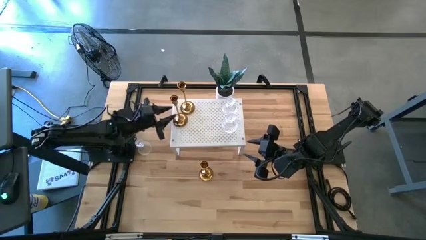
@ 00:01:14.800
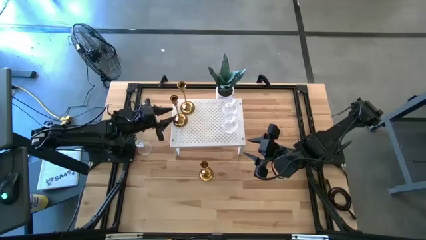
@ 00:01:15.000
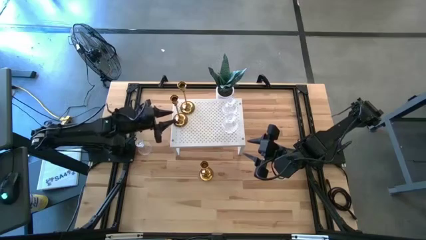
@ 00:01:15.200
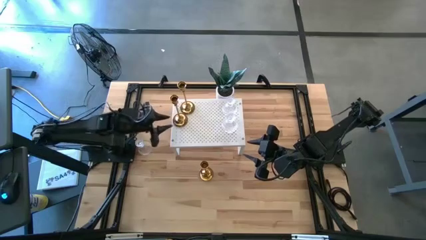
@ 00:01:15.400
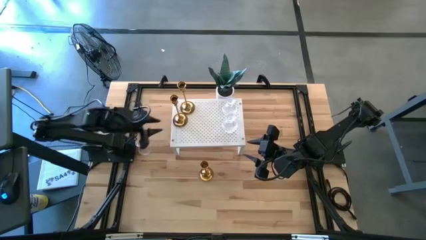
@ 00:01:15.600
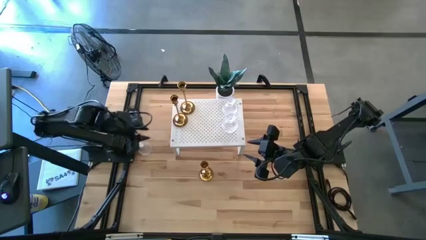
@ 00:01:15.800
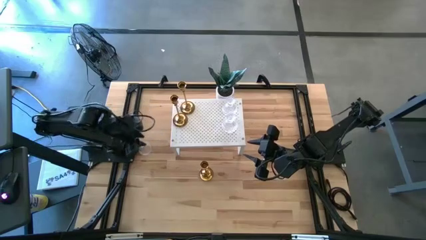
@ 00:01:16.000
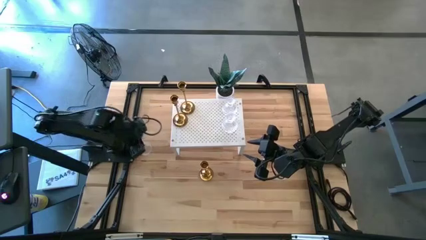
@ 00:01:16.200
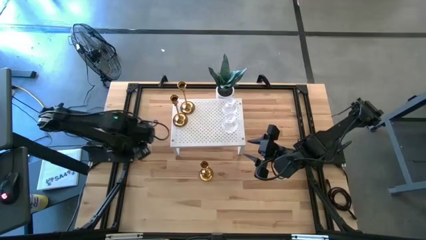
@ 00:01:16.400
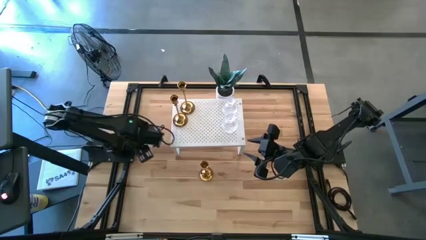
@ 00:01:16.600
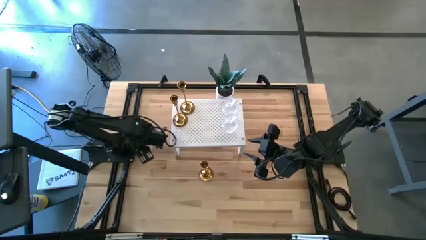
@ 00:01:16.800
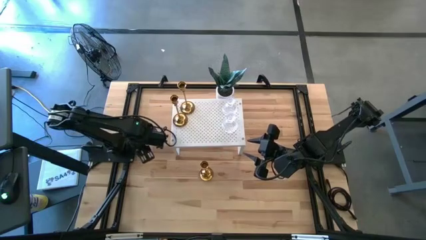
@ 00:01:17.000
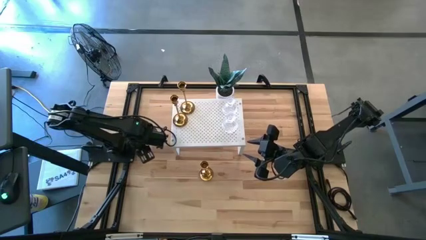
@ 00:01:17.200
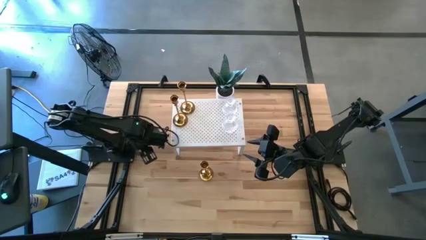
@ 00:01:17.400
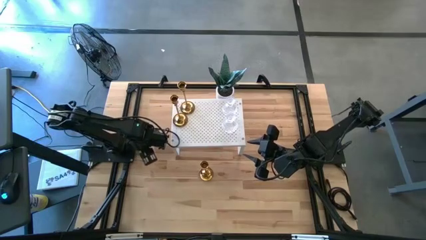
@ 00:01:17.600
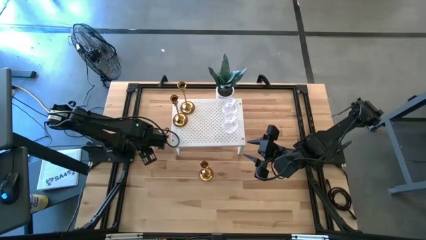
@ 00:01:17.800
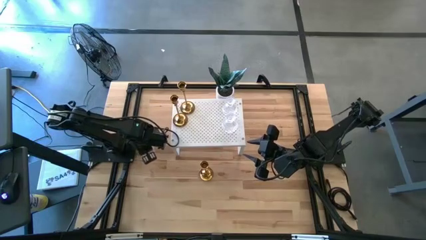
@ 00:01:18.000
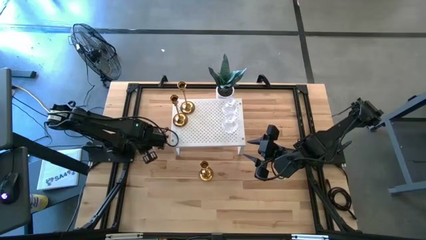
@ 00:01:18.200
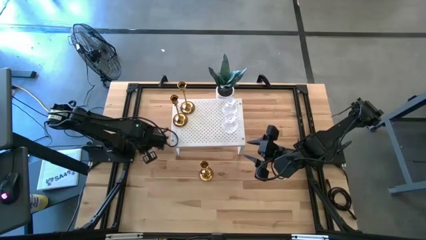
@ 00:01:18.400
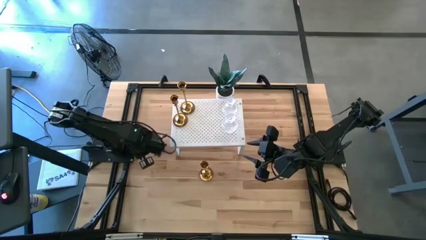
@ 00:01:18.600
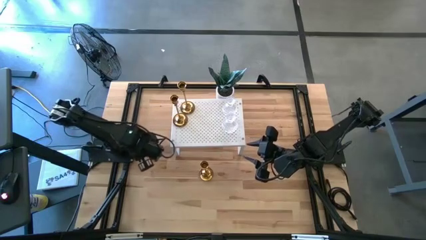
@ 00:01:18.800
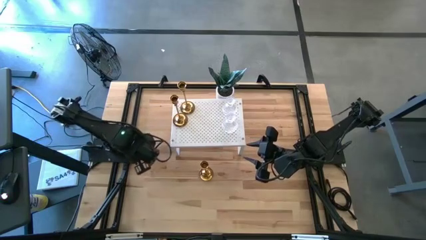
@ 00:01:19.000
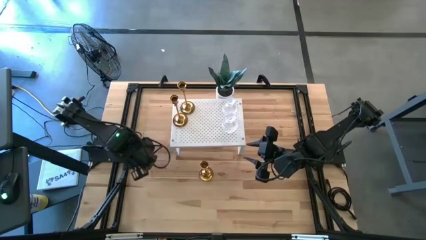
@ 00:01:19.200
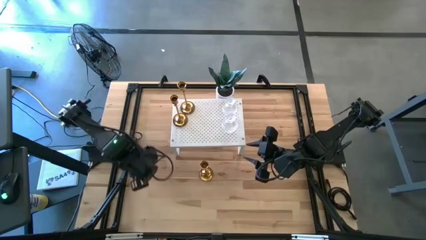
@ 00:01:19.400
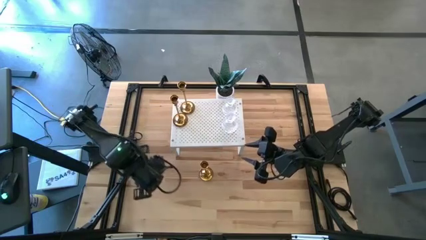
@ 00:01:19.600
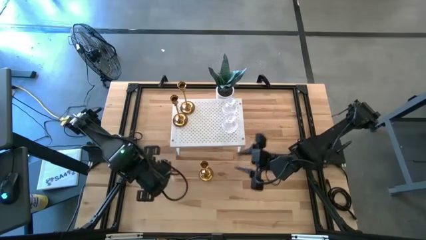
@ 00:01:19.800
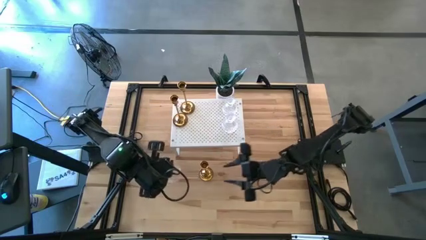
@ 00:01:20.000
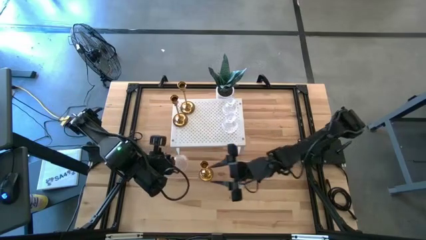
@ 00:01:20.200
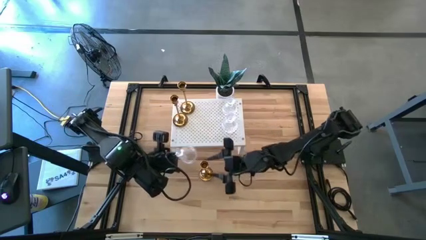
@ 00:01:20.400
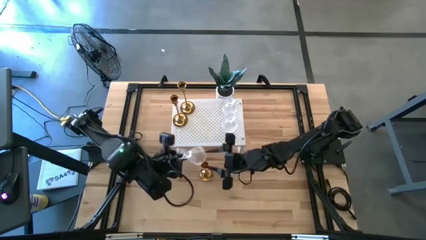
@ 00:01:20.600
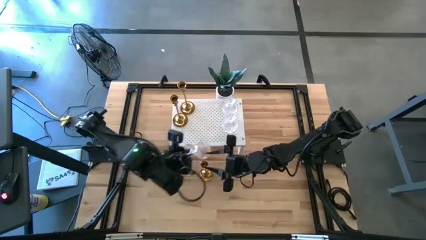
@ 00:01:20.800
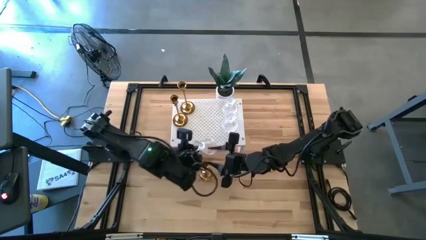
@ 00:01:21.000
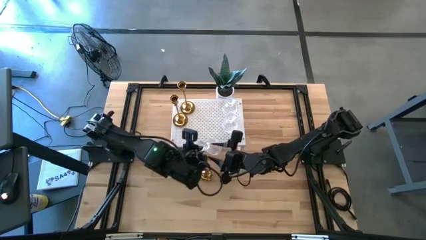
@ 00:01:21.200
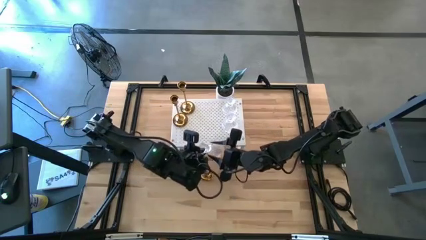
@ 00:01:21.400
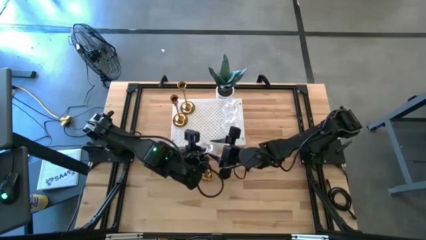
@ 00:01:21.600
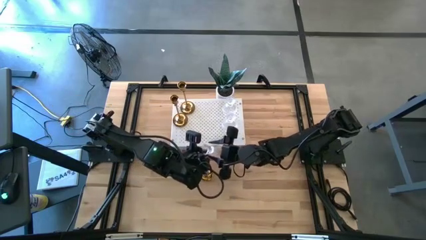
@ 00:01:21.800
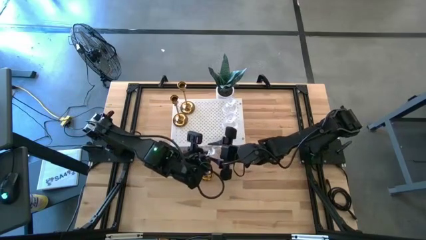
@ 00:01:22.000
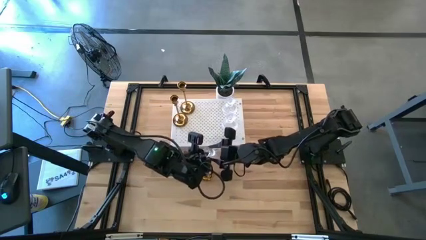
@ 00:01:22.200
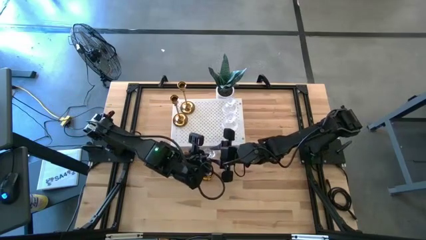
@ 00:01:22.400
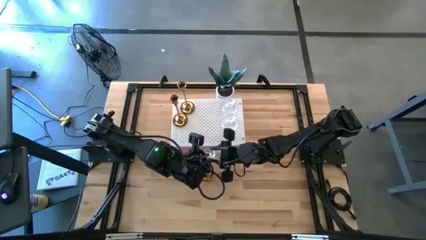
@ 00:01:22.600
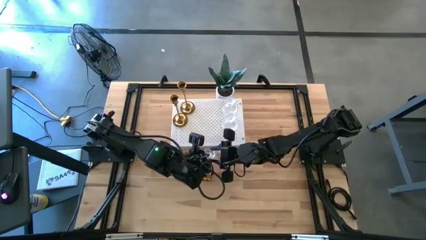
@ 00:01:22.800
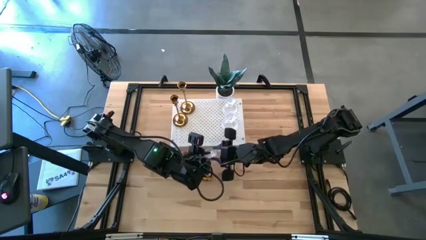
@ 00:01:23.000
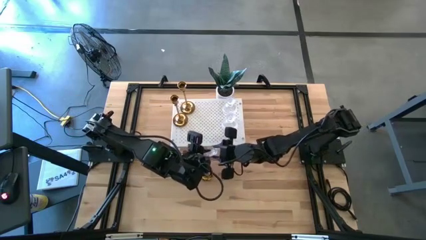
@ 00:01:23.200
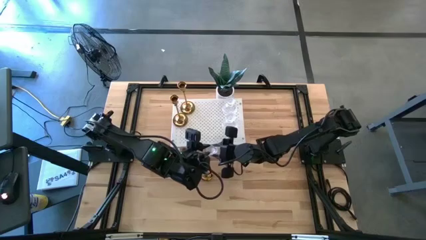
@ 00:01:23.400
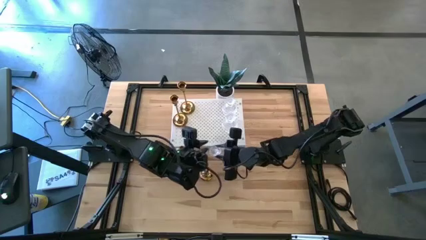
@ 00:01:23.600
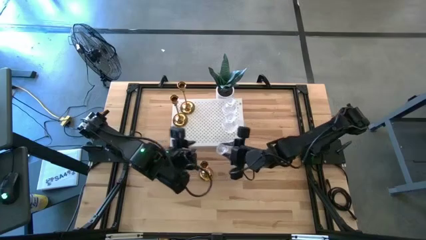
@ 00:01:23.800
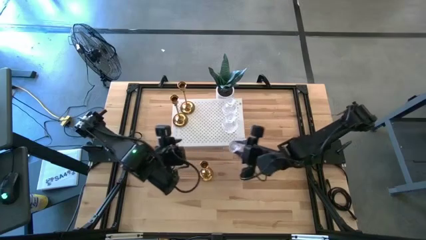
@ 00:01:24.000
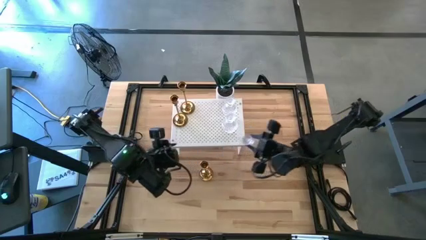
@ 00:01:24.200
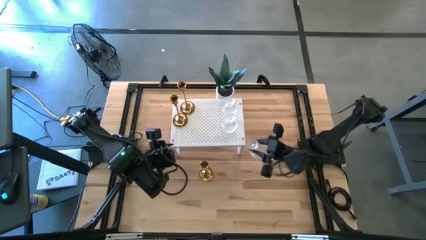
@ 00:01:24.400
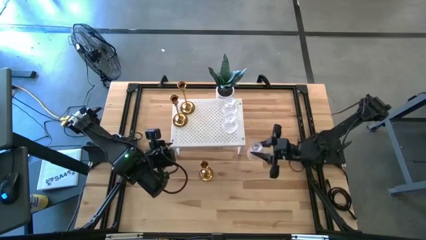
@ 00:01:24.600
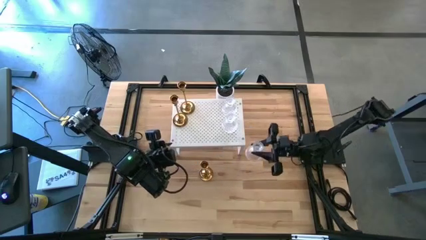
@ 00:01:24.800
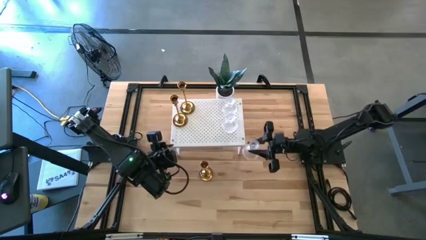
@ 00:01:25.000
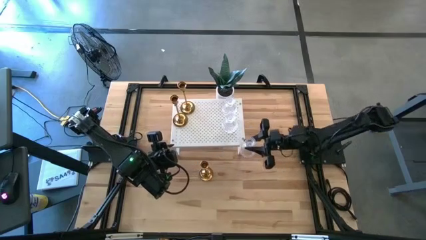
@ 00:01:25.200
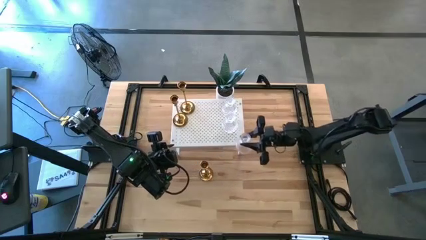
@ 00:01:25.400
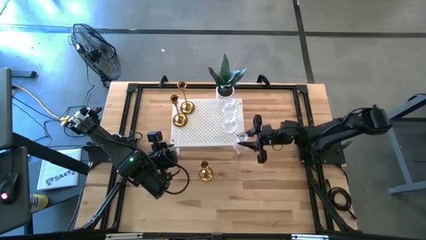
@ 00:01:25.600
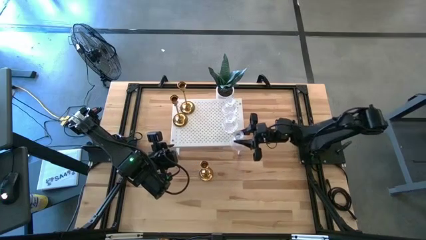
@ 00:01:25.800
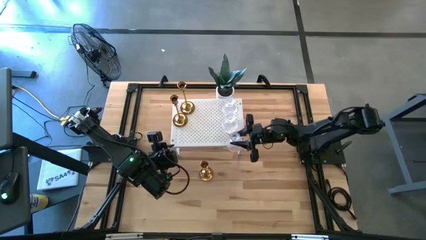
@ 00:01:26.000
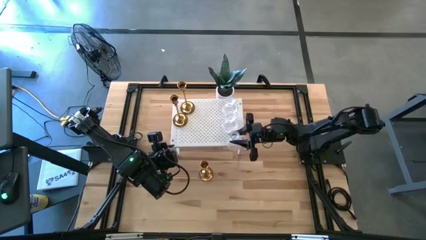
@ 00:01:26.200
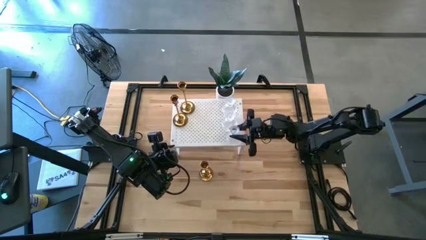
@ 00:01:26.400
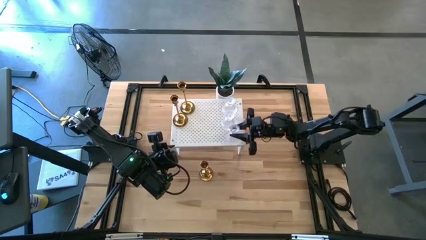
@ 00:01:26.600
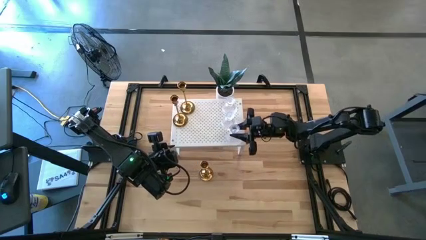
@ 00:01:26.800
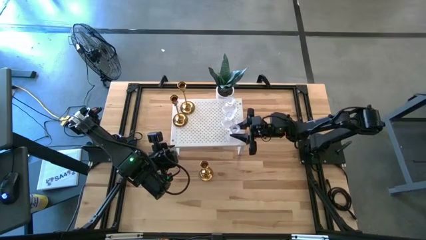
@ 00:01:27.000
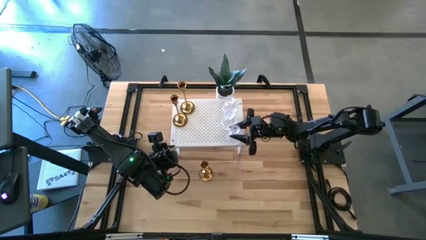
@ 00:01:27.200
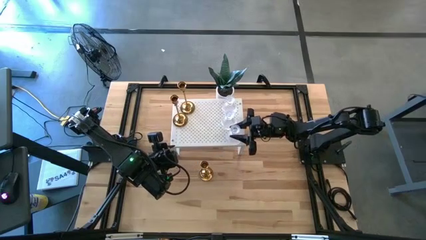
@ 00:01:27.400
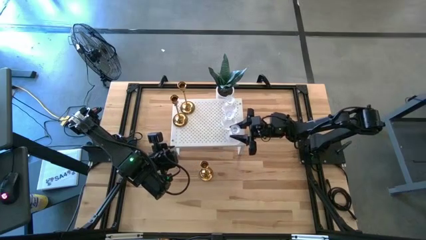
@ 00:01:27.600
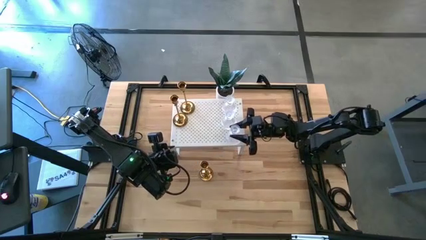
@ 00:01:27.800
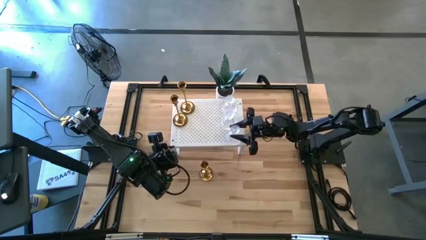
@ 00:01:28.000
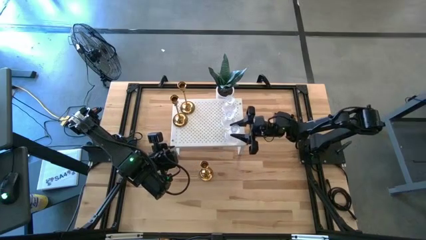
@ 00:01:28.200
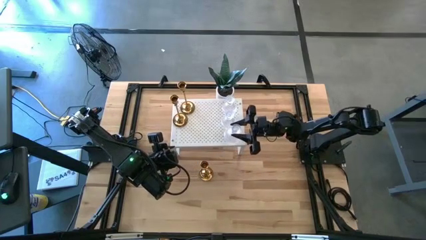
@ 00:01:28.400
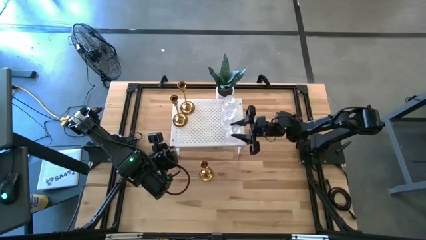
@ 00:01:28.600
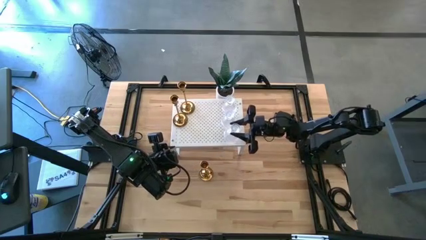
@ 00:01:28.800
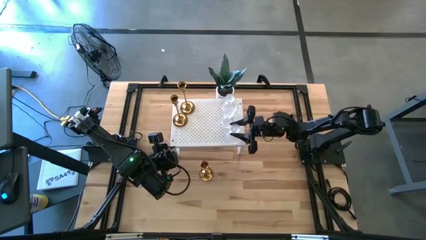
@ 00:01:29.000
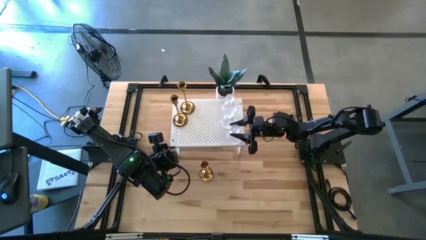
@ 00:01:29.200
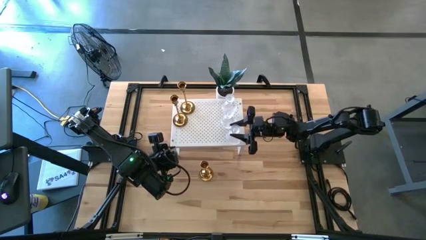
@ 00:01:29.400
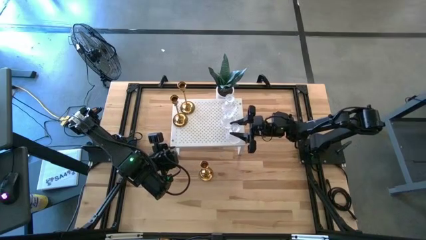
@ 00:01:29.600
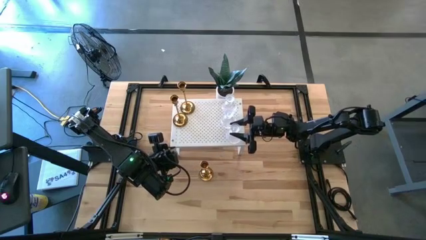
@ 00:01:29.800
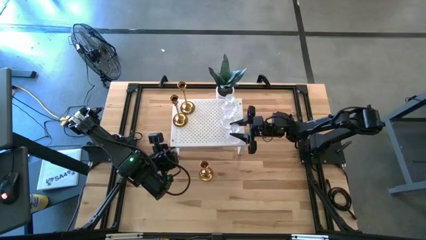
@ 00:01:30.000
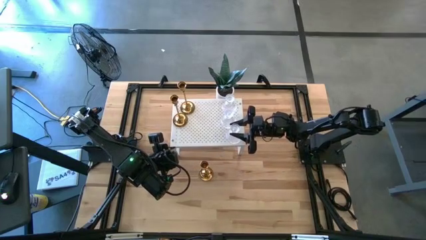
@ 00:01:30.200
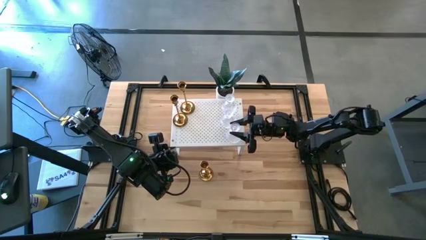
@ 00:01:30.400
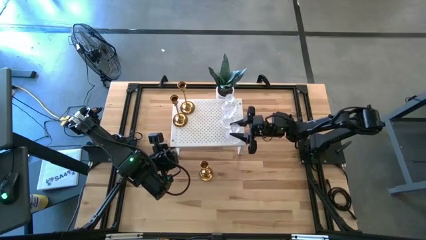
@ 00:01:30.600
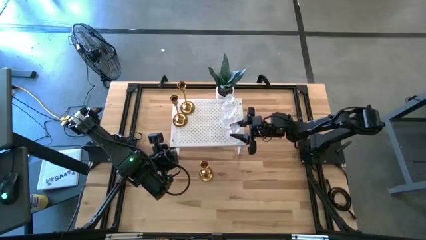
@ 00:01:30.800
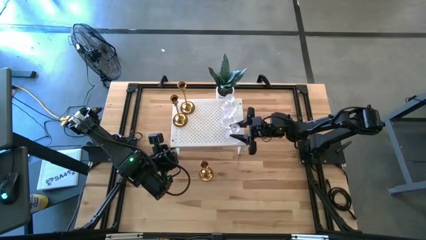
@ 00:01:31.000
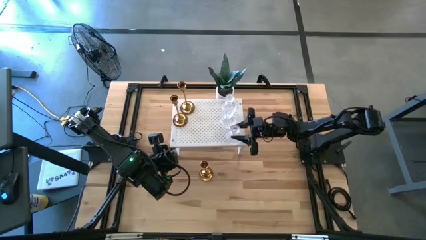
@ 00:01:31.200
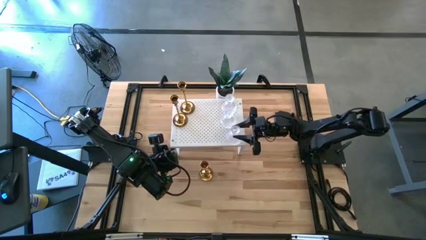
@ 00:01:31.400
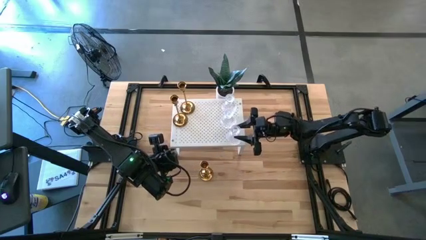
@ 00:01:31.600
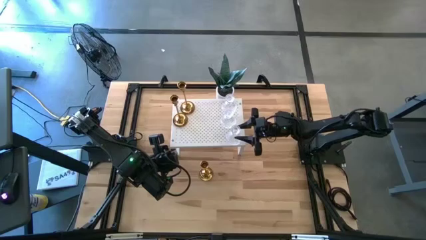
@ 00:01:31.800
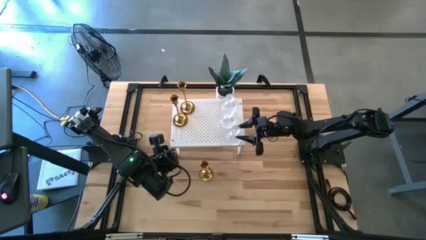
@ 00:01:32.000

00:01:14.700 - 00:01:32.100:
Task: Pick & Place candle stick holders
Put the transparent candle holder on the shelf aligned with the other transparent candle holders
